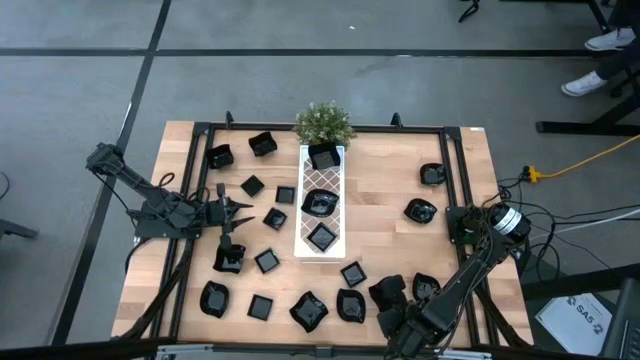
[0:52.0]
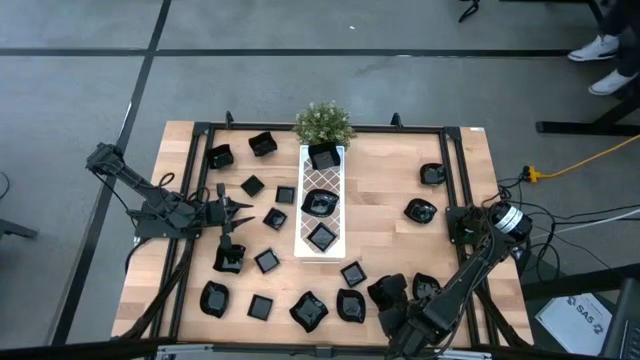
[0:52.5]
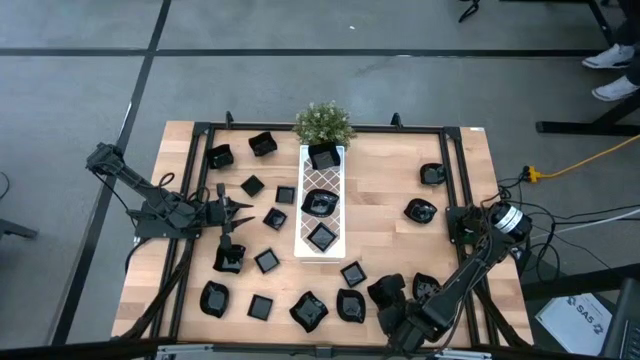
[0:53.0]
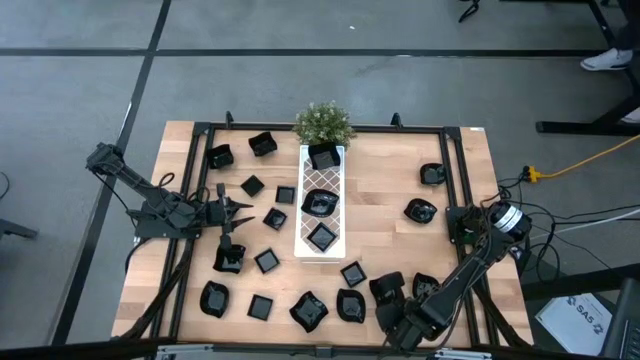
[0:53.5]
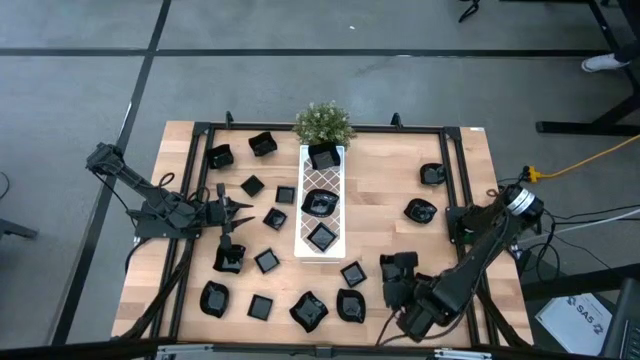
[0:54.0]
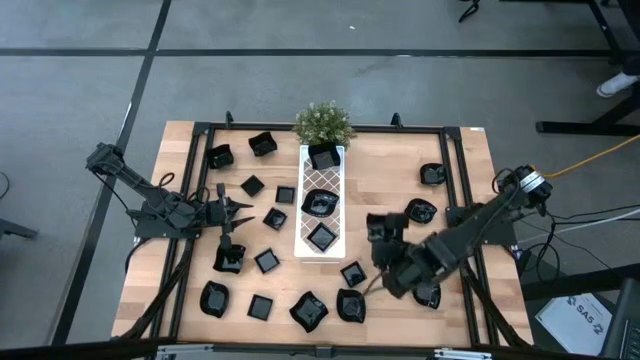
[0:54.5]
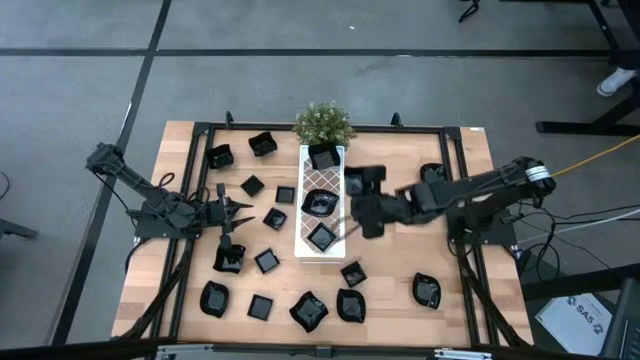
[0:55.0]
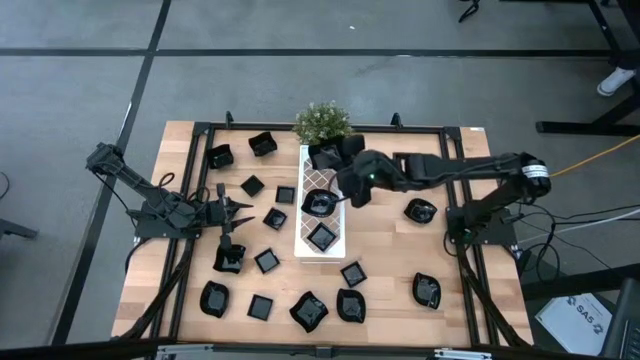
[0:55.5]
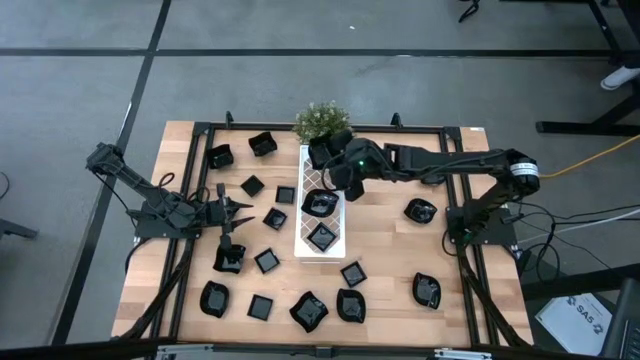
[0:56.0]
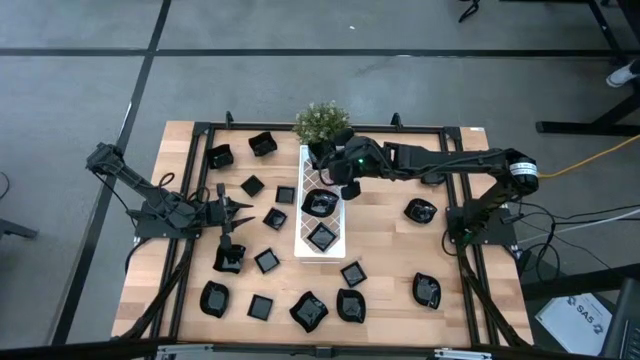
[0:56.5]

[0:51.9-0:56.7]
Task: Pick & Place Mini shaped plates
Stack the distorted square plate on top of the distorted square plate on the shelf

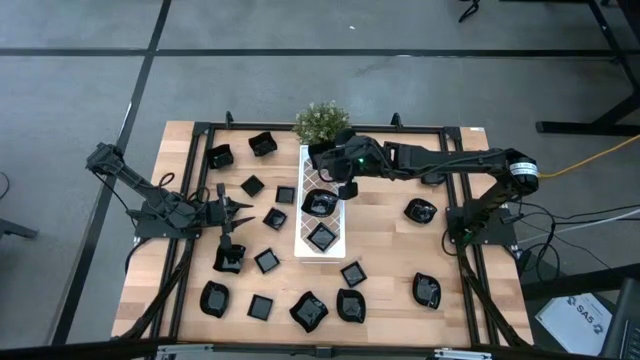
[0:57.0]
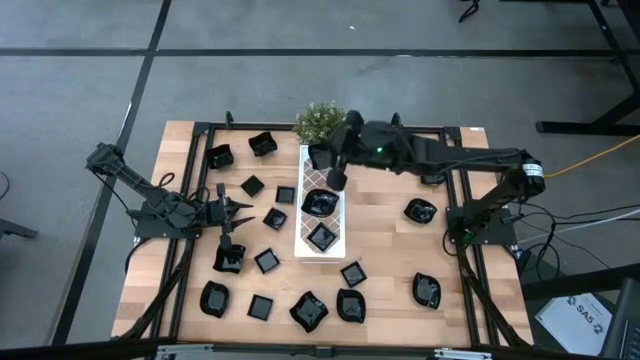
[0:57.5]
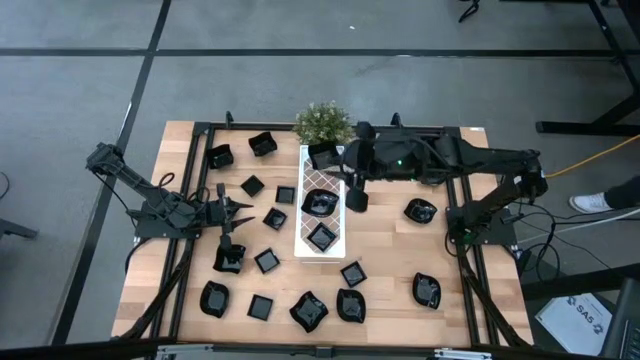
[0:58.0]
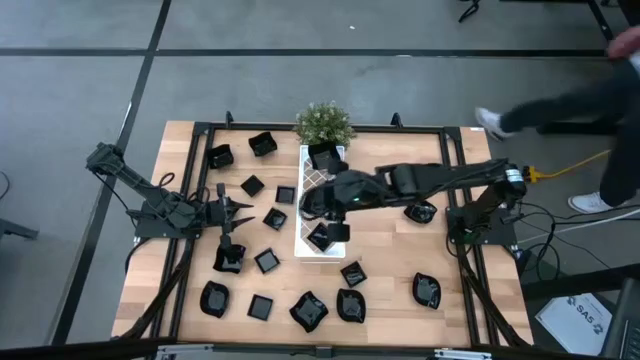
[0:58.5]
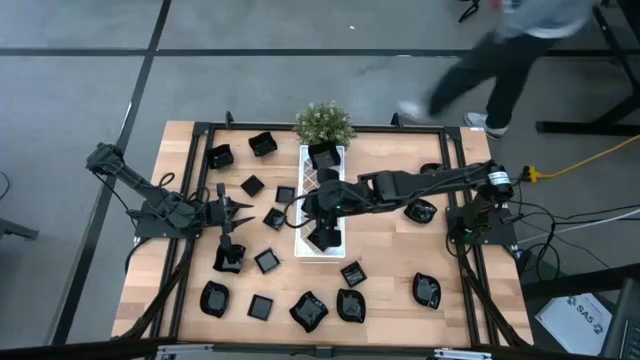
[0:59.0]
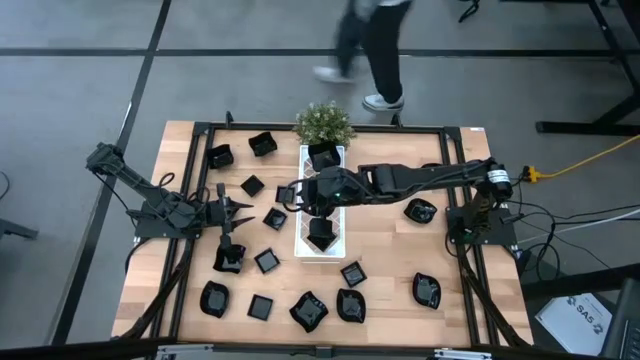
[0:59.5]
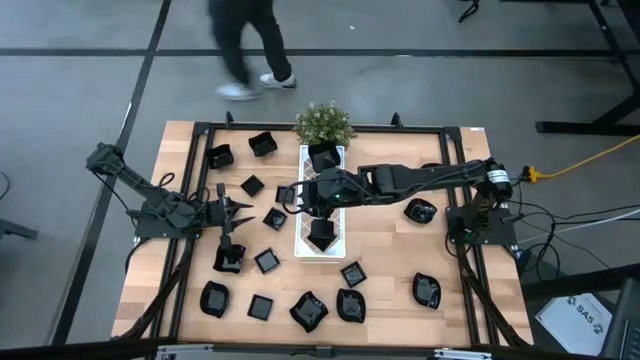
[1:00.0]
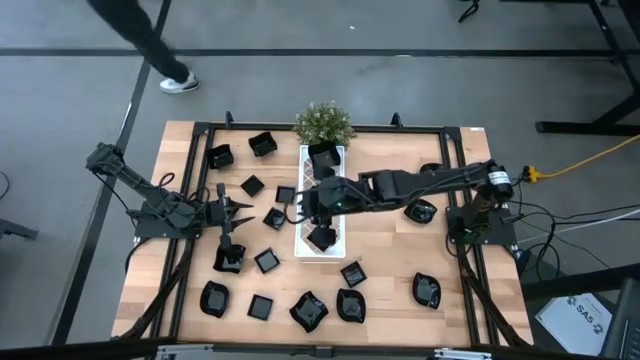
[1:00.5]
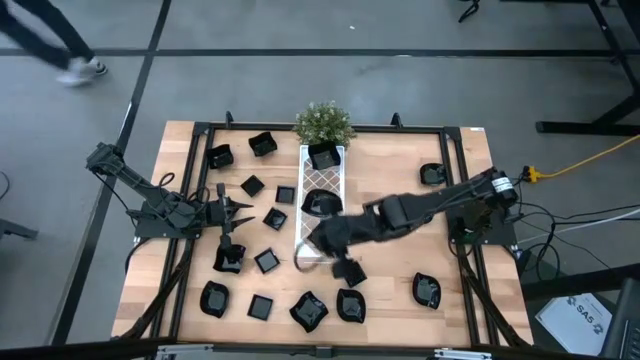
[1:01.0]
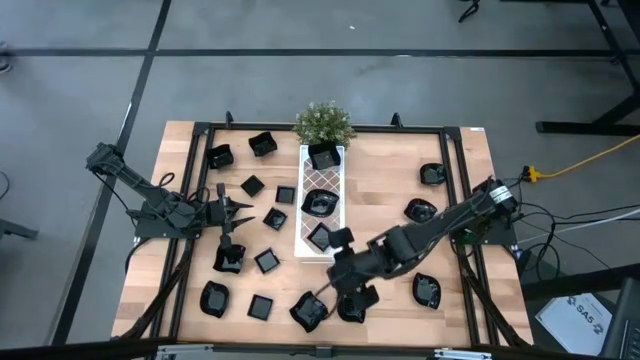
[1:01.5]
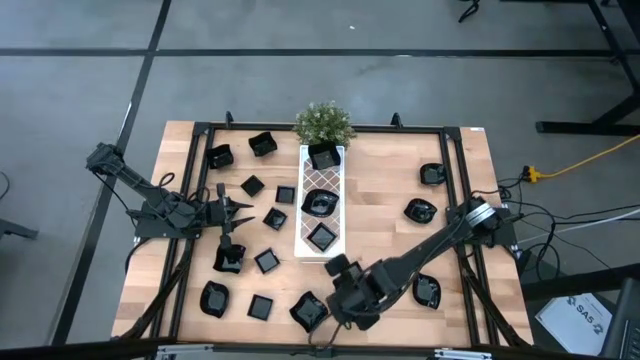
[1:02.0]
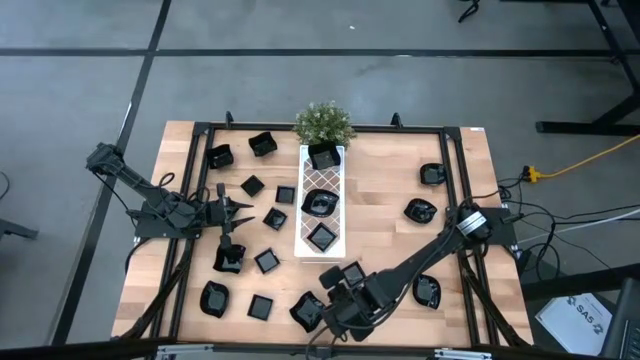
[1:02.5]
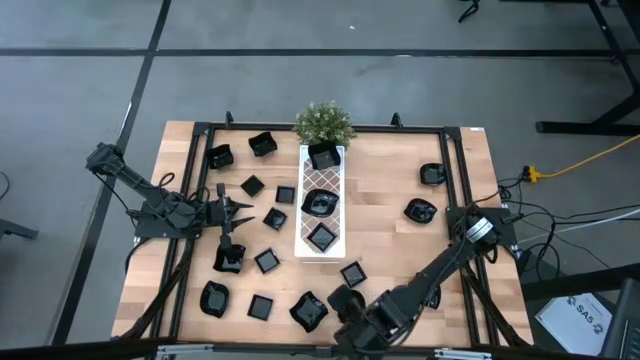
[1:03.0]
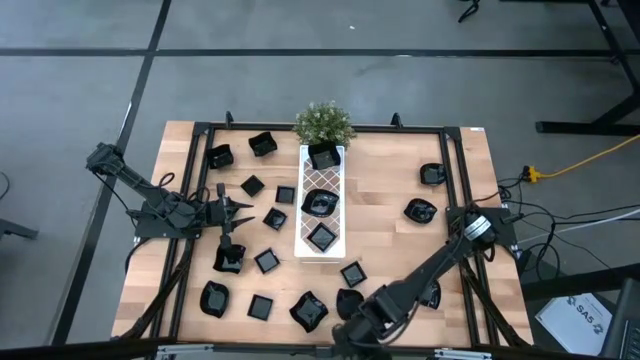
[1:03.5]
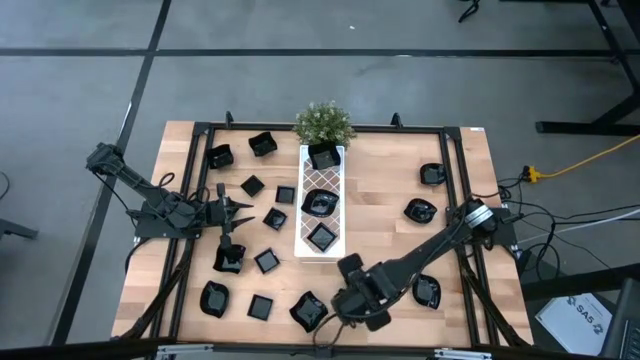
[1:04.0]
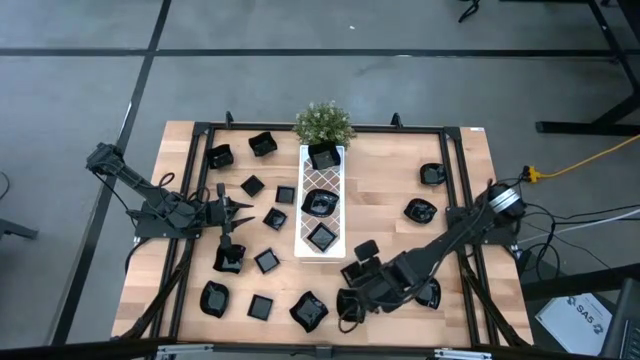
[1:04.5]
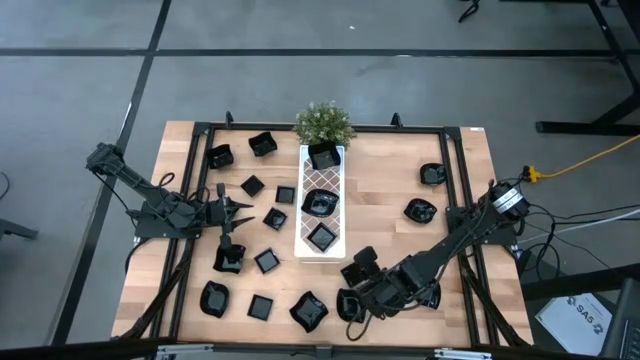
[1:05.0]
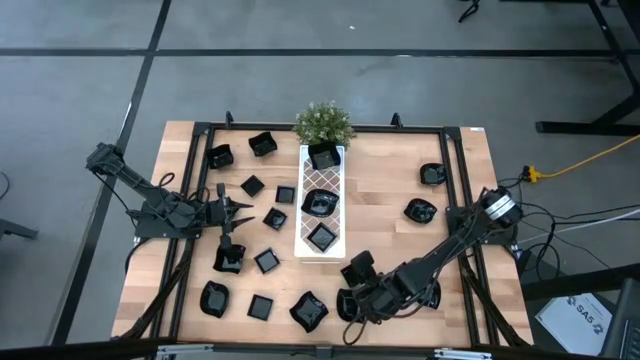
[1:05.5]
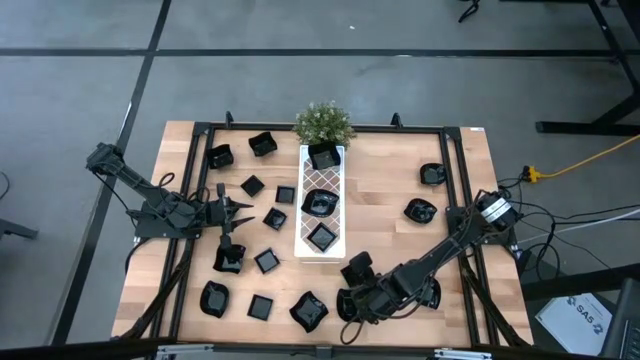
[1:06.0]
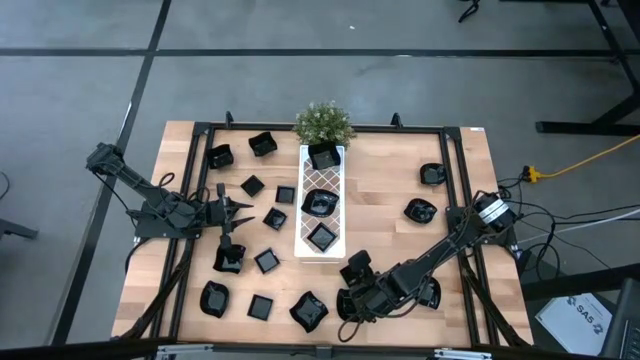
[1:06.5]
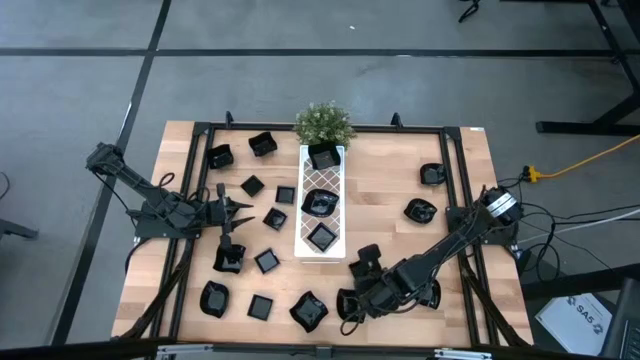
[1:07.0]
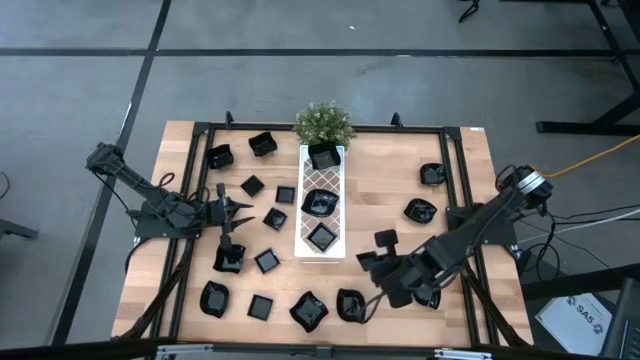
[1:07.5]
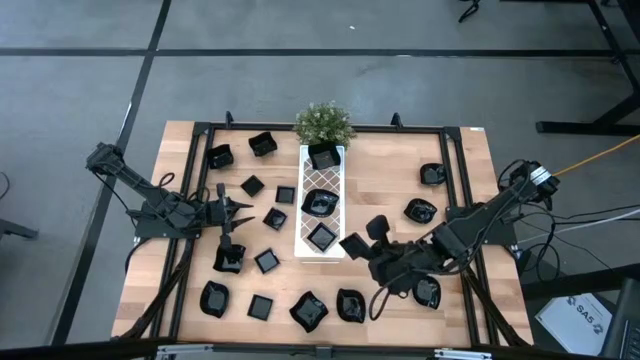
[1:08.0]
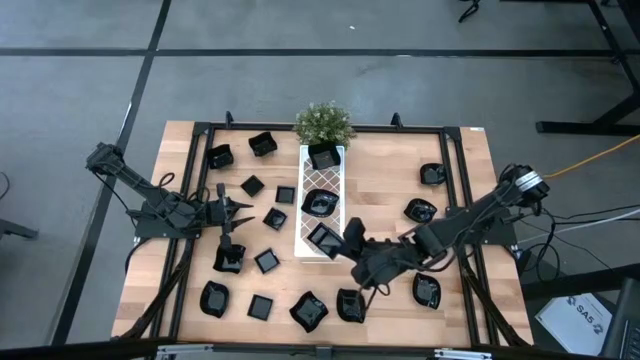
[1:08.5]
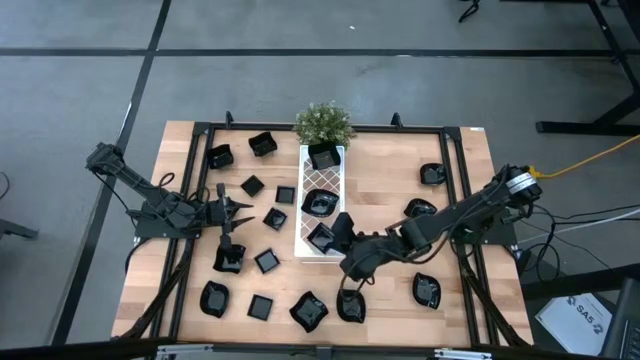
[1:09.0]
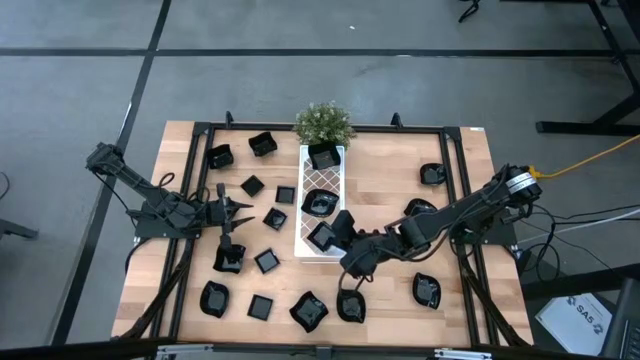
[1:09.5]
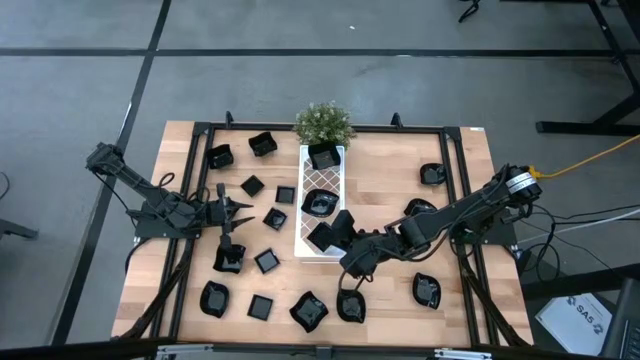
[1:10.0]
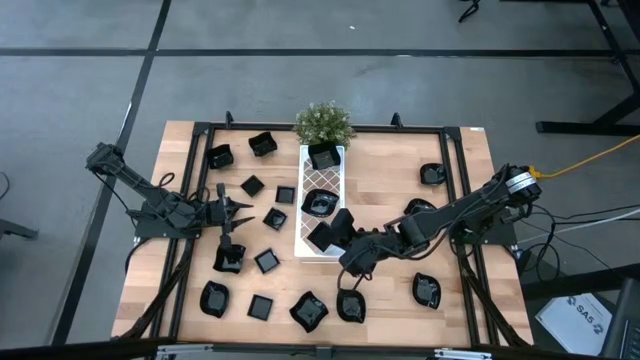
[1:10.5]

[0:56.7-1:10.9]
Stack the square plate on top of the square plate on the shelf

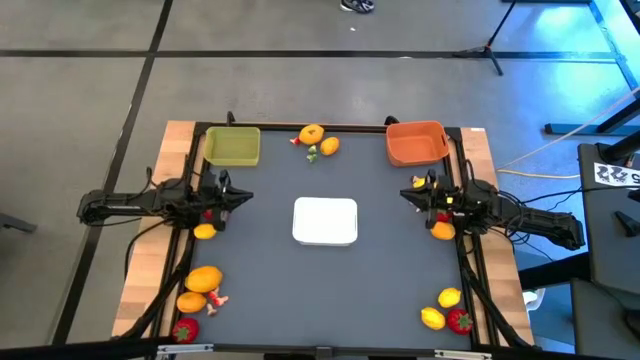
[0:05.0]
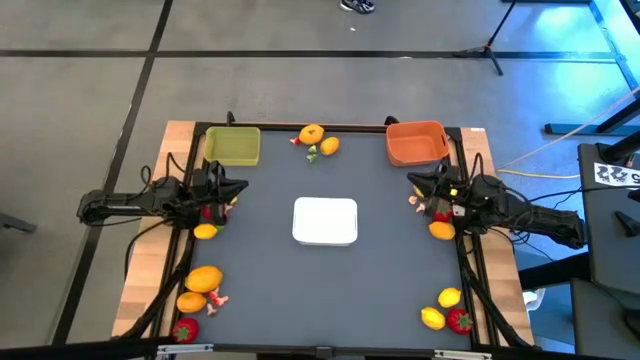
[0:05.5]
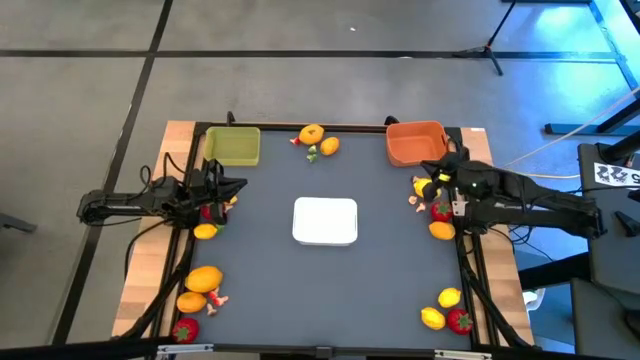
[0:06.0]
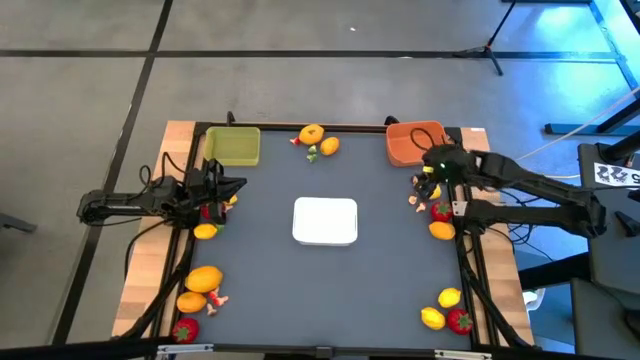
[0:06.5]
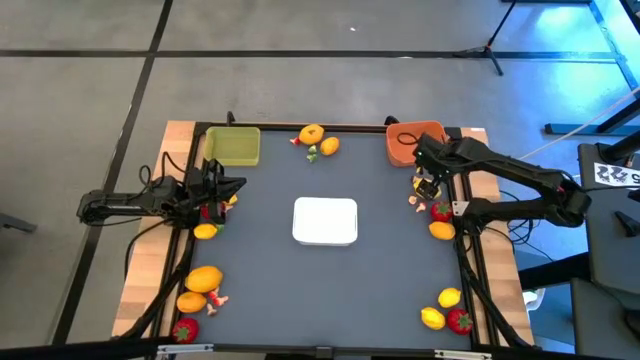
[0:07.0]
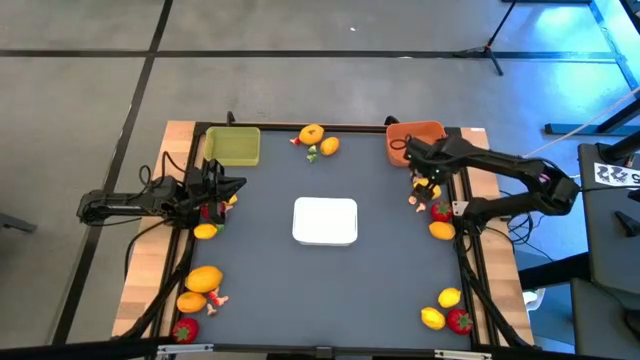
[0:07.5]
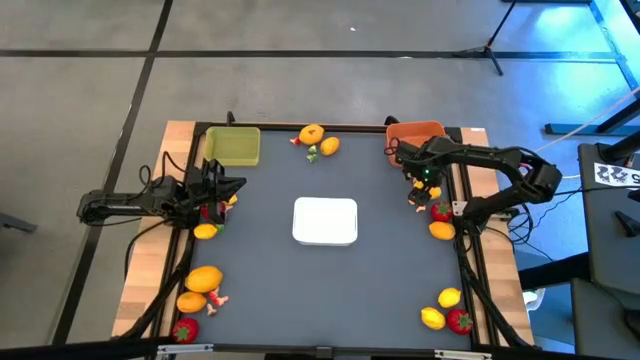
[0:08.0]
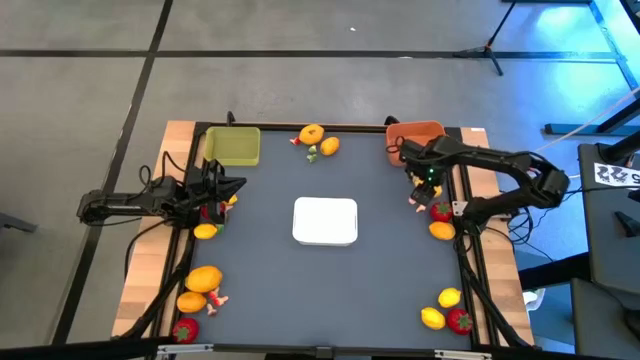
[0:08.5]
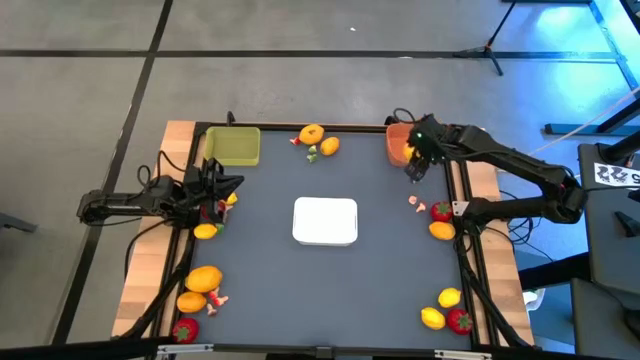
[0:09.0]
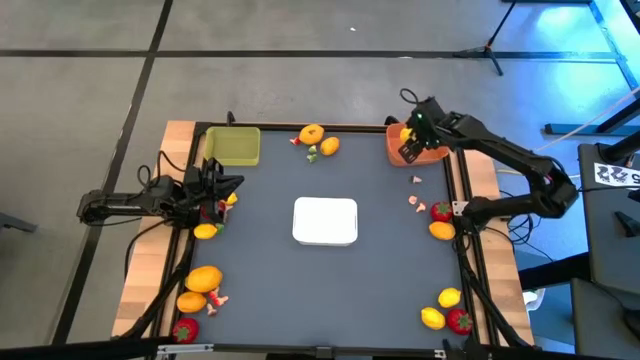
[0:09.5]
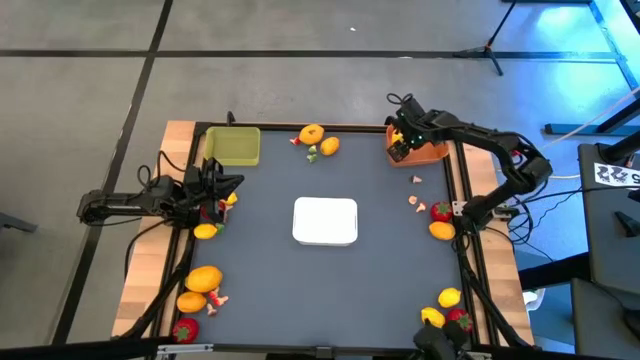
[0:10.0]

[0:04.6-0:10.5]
Task: Sort produce into baskets
Put the yellow lemon into the orange bin
